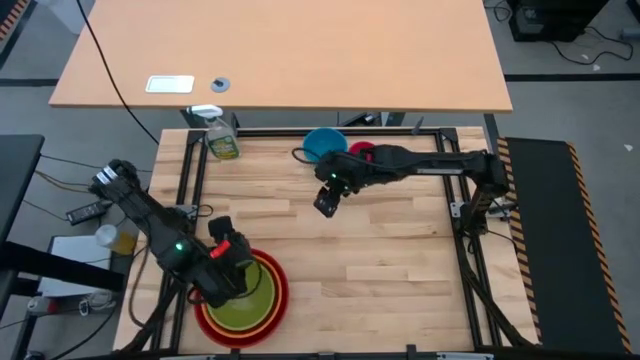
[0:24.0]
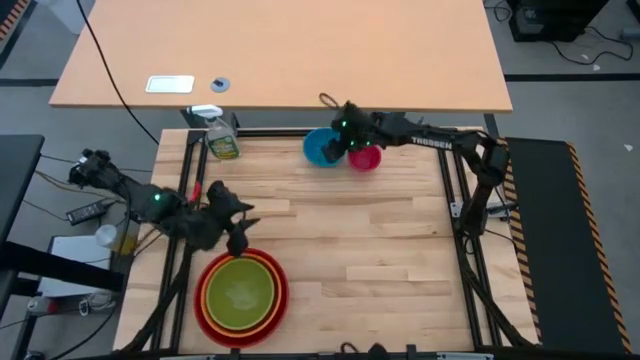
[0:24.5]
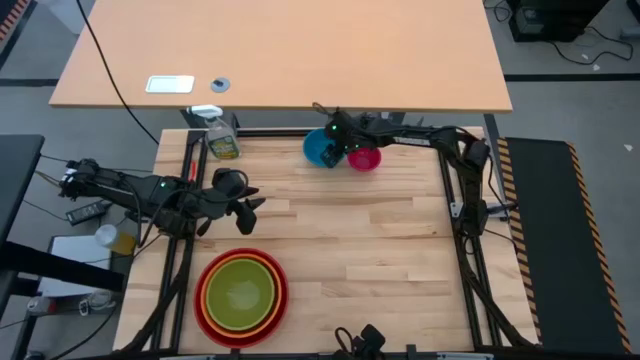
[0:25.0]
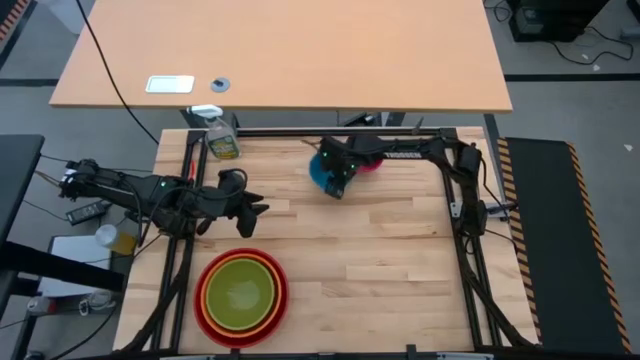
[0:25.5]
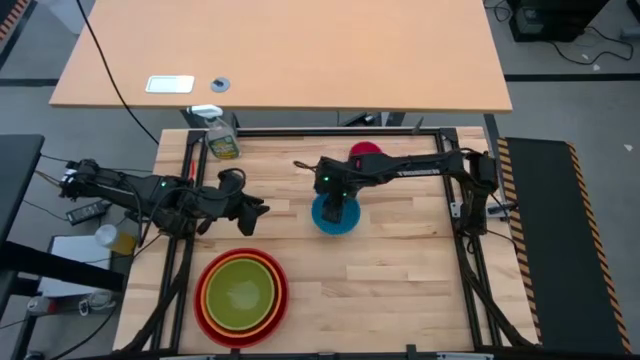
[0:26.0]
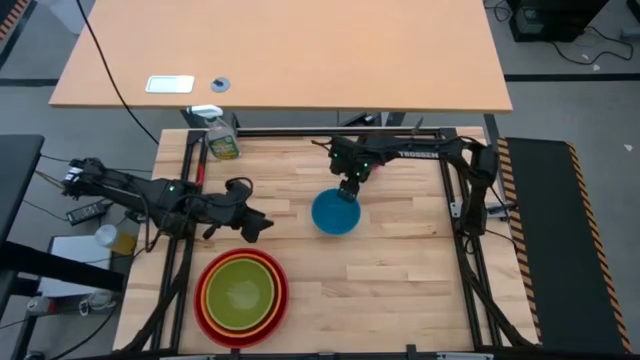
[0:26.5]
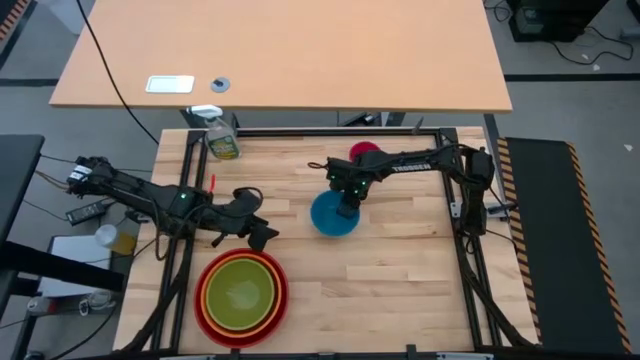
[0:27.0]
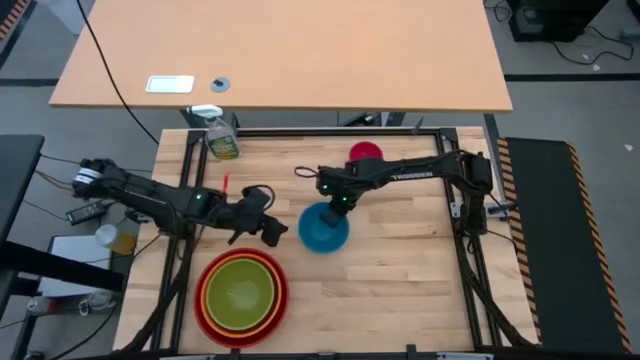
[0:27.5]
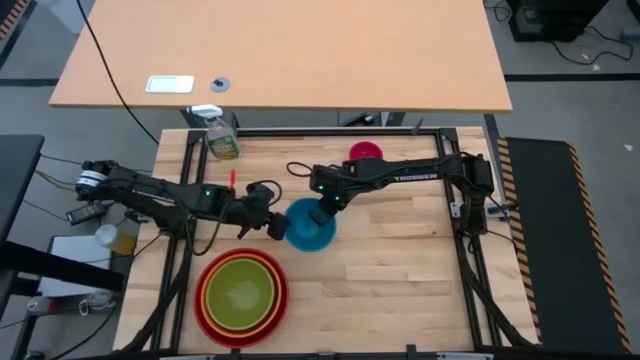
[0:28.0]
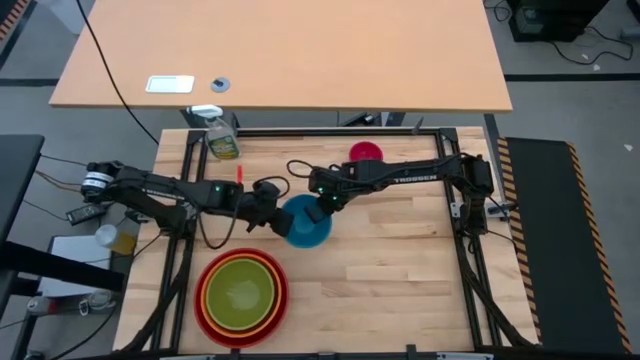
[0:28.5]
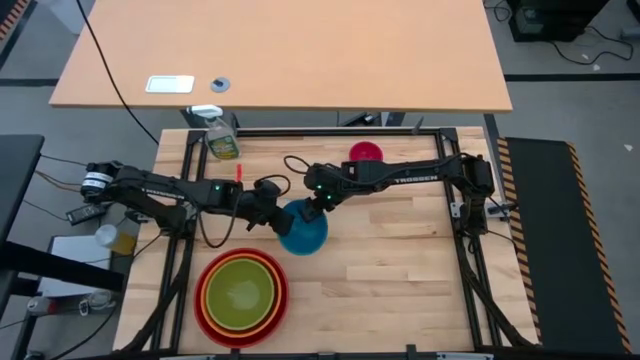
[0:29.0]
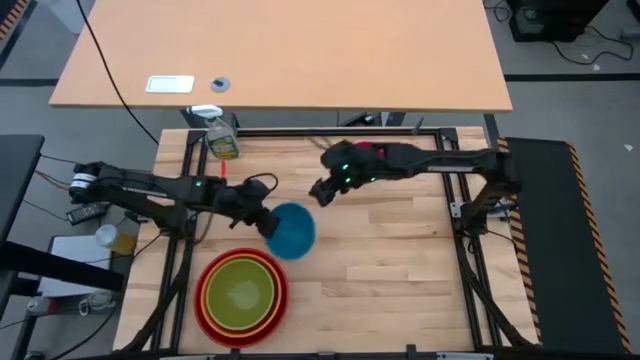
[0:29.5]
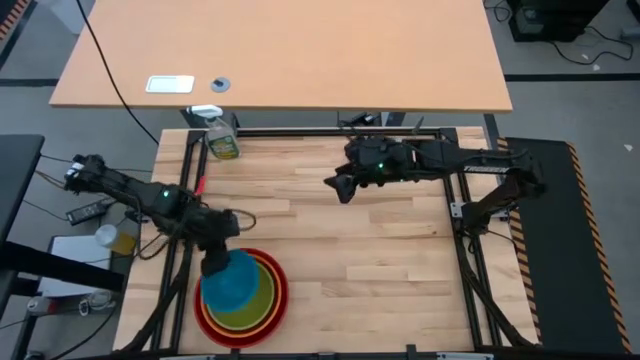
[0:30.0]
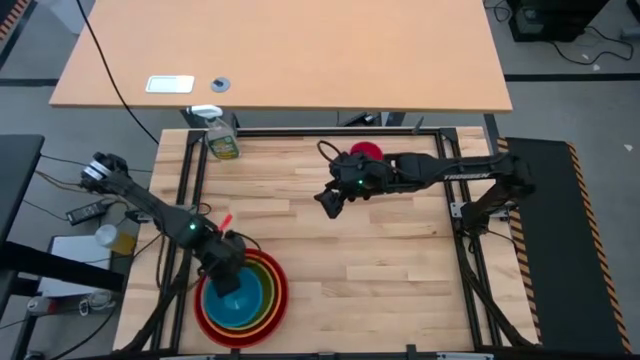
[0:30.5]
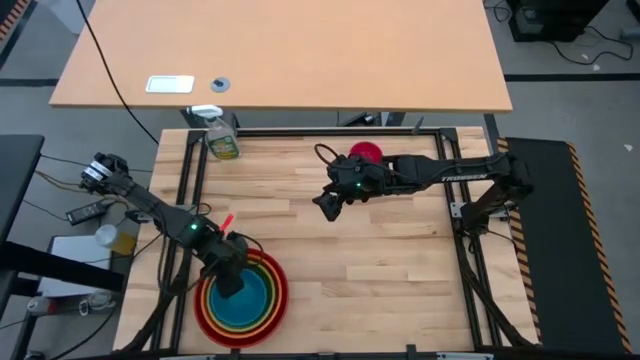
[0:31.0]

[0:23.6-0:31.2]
Stack the blue bowl on top of the green bowl

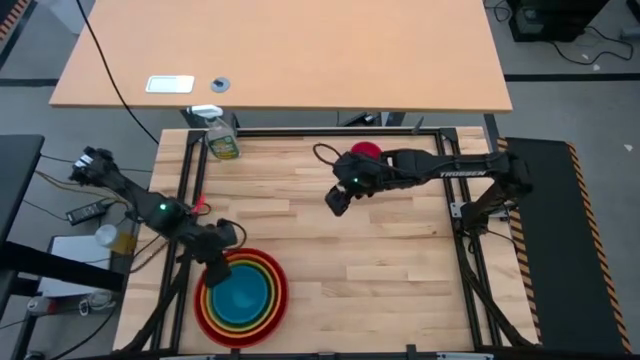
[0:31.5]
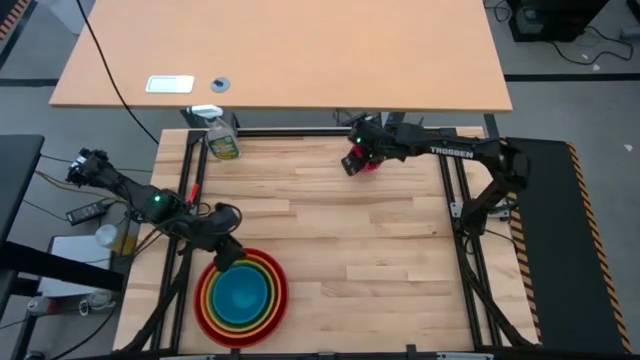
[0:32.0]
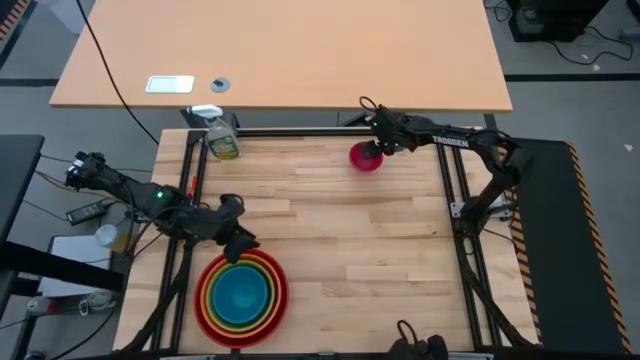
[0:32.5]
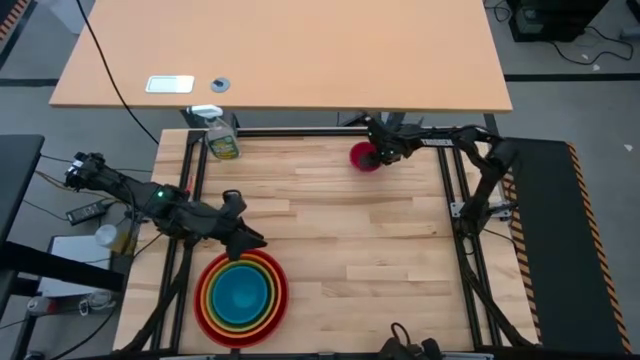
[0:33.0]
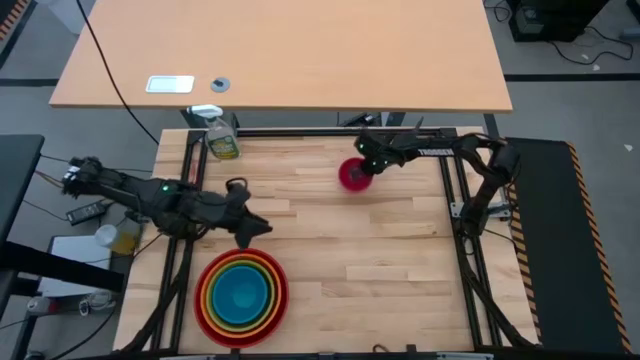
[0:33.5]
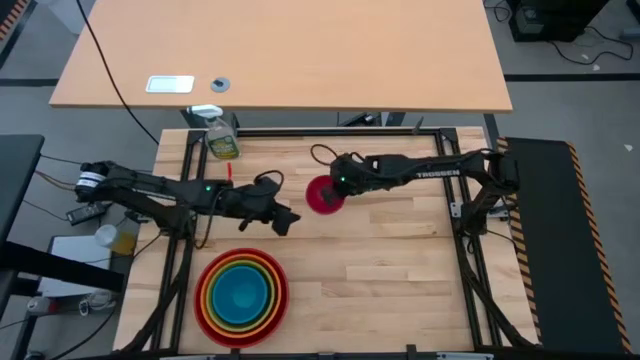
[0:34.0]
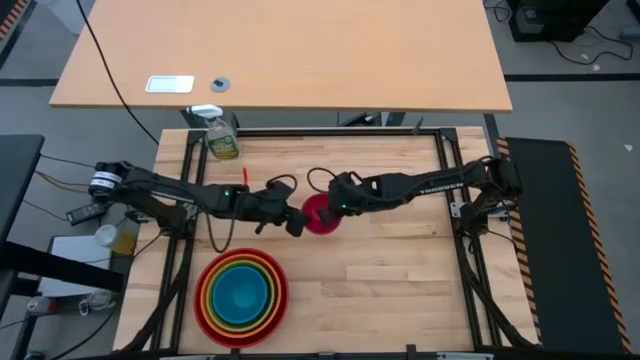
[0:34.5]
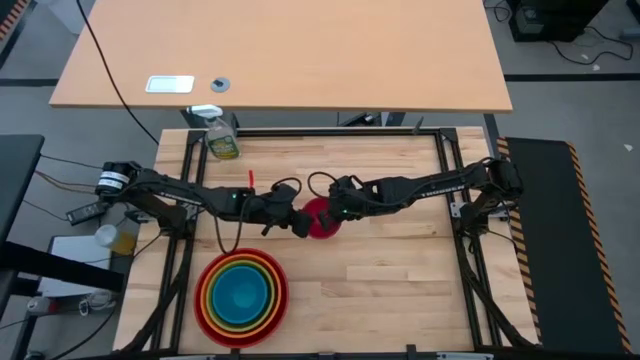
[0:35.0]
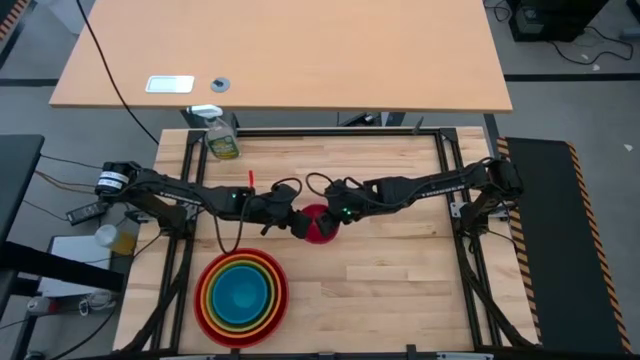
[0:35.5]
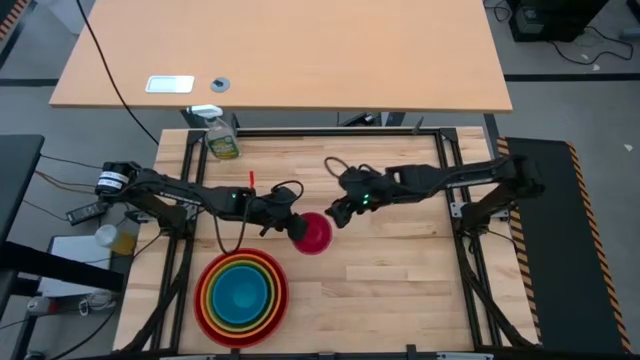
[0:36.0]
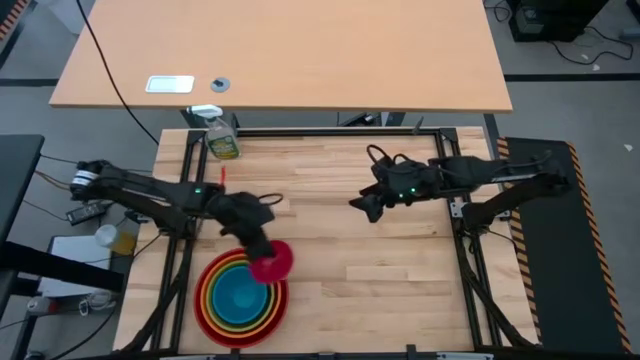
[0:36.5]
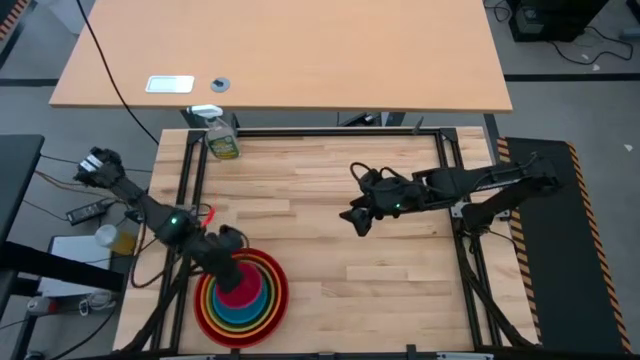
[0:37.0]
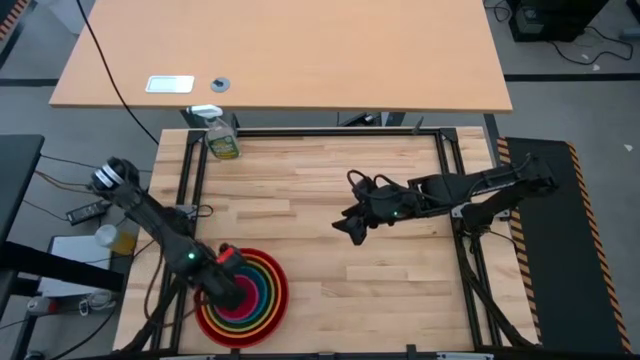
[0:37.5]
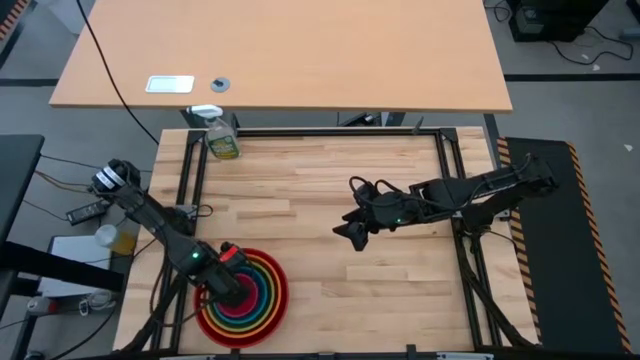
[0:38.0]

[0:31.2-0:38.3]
Stack the small pink bowl on top of the blue bowl

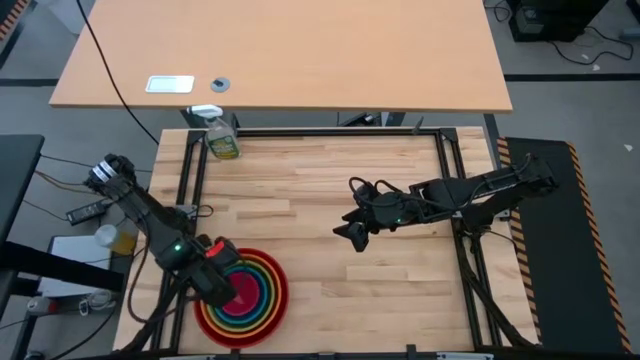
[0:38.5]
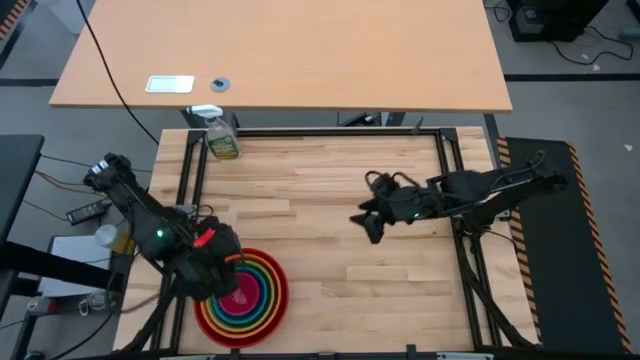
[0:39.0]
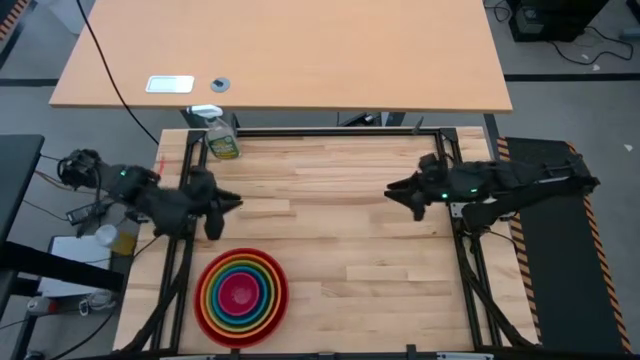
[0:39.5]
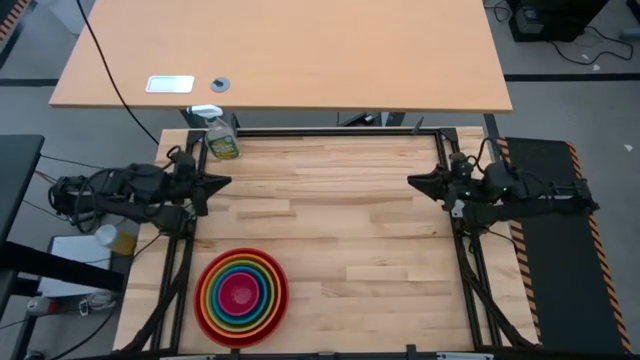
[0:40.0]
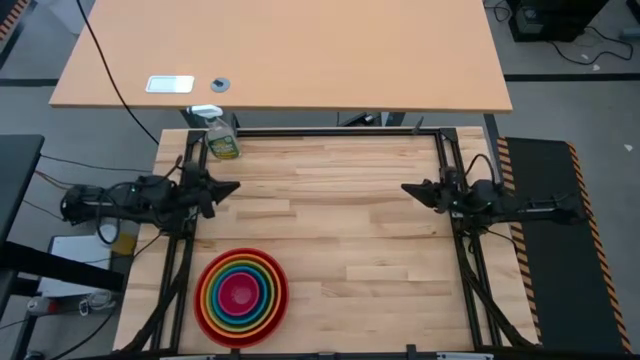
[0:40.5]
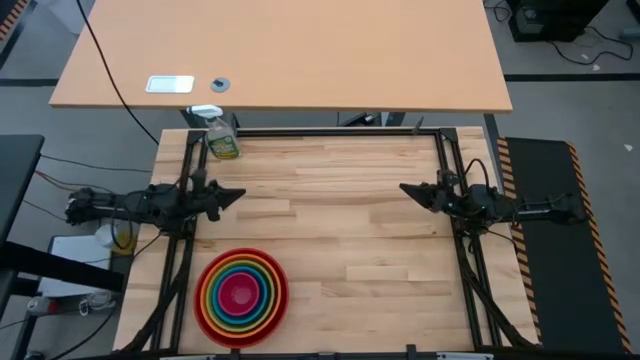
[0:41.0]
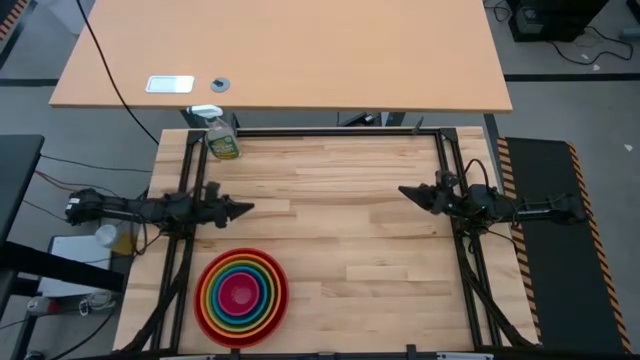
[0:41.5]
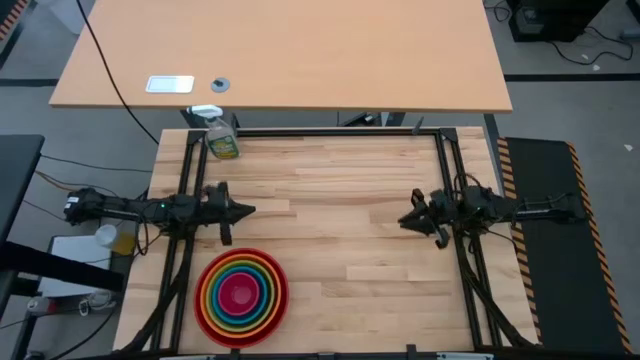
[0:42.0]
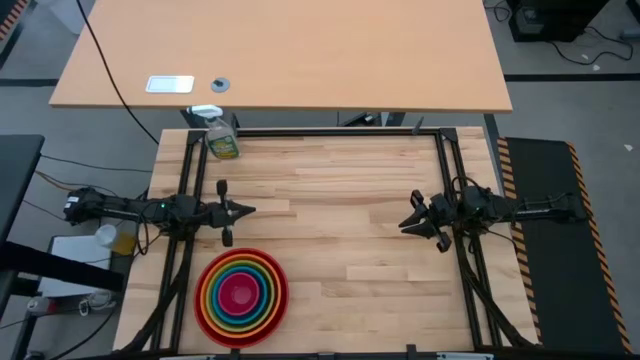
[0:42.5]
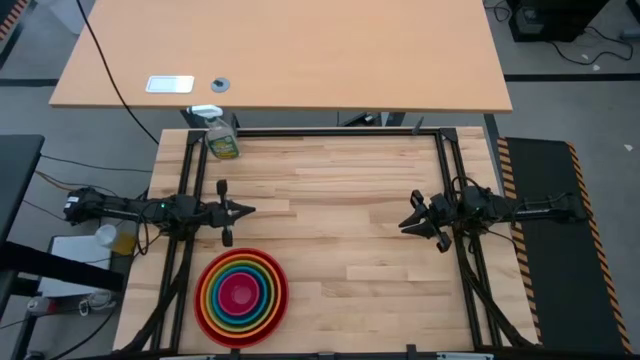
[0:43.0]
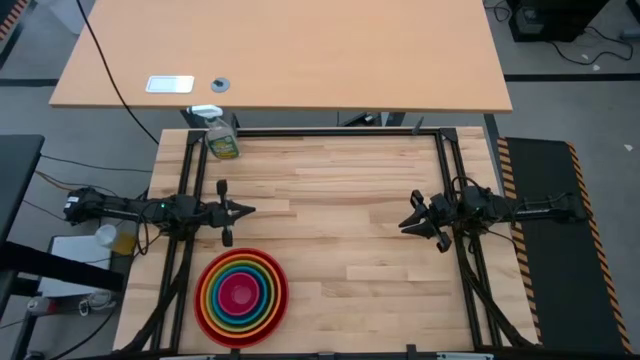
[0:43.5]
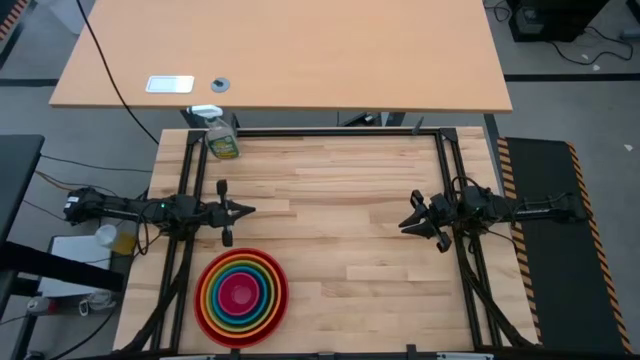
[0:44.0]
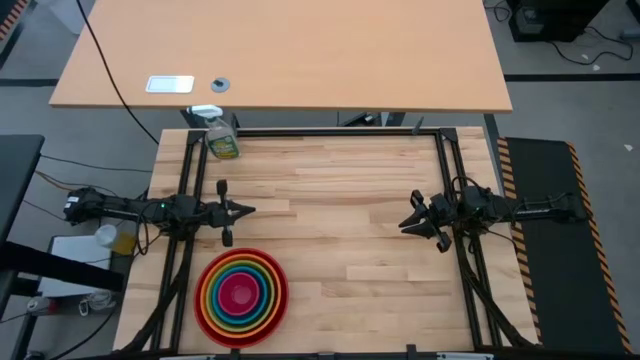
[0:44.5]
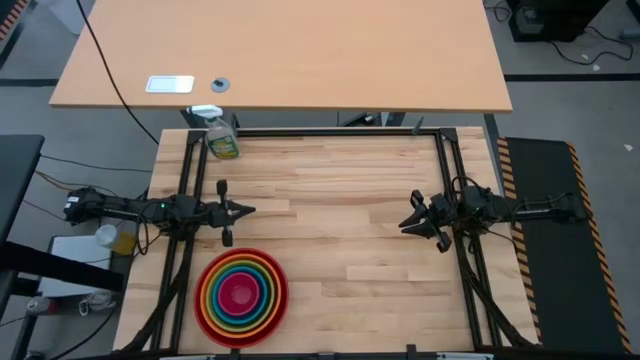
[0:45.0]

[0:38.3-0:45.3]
Return to Home Position
